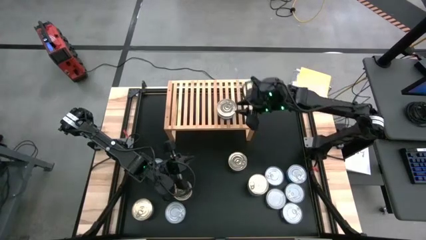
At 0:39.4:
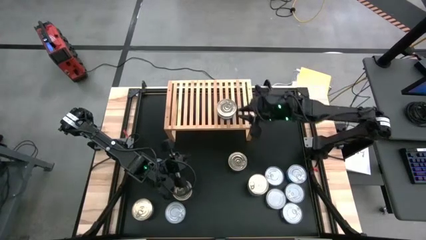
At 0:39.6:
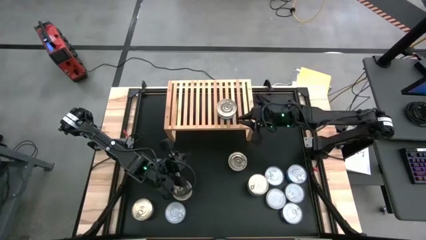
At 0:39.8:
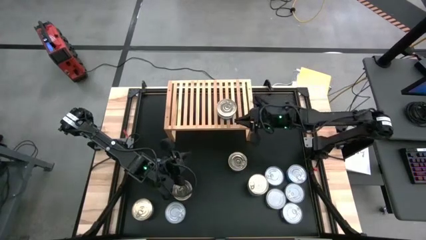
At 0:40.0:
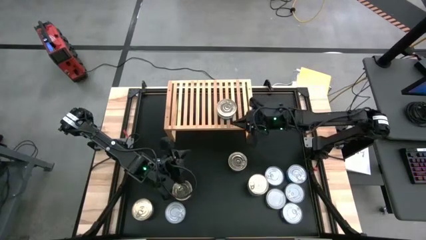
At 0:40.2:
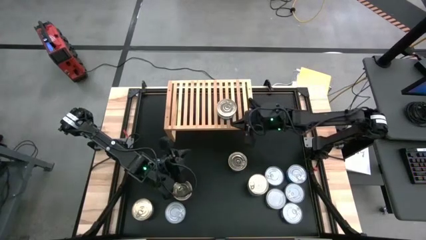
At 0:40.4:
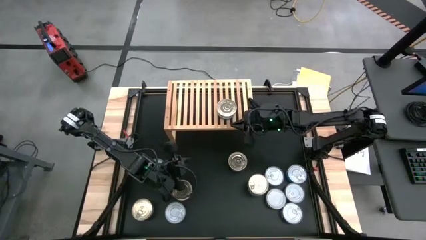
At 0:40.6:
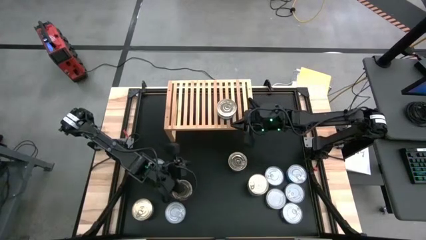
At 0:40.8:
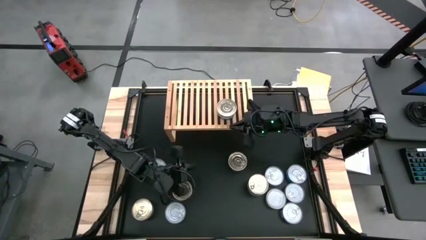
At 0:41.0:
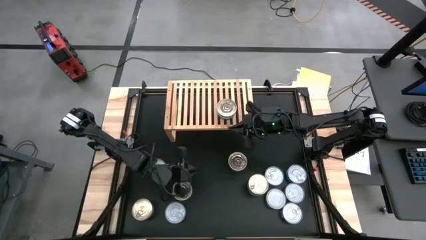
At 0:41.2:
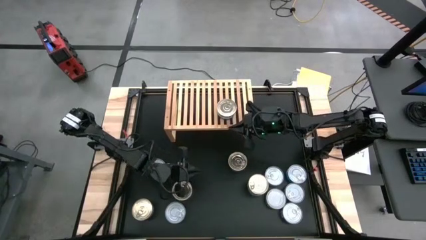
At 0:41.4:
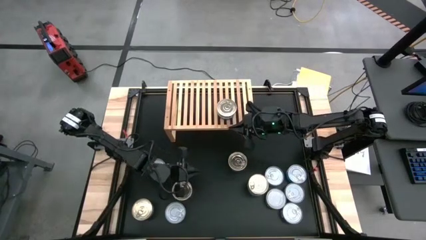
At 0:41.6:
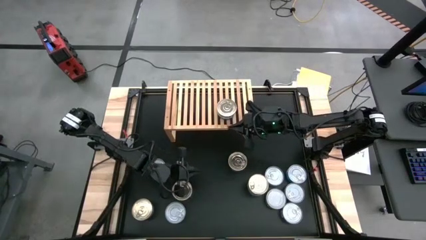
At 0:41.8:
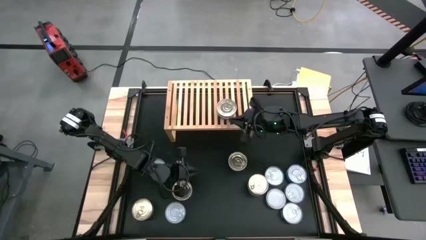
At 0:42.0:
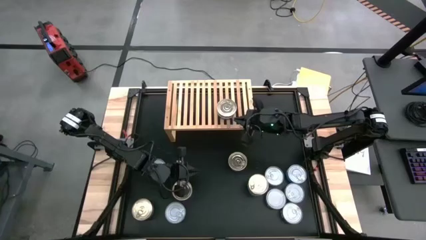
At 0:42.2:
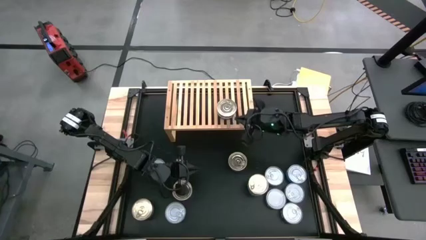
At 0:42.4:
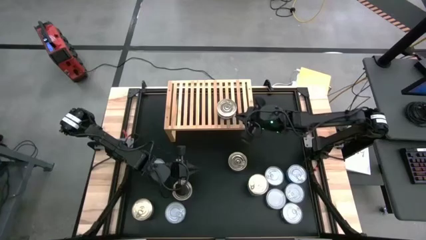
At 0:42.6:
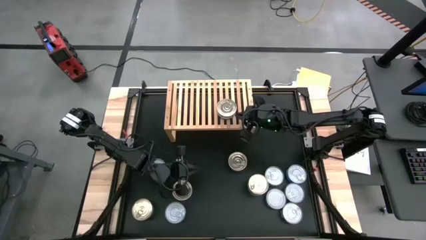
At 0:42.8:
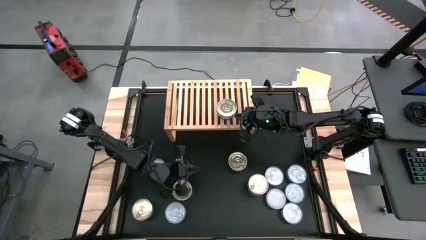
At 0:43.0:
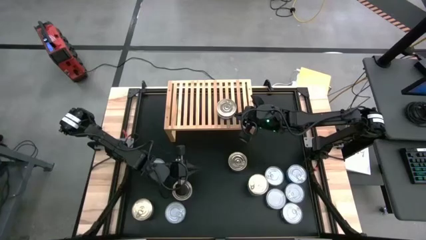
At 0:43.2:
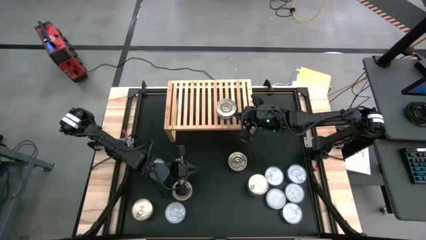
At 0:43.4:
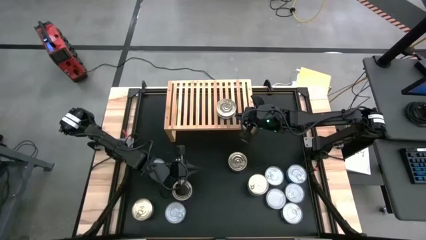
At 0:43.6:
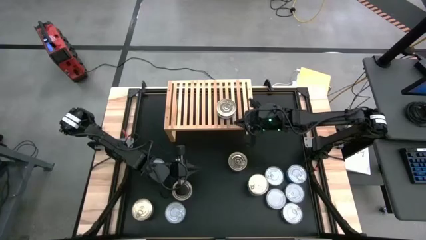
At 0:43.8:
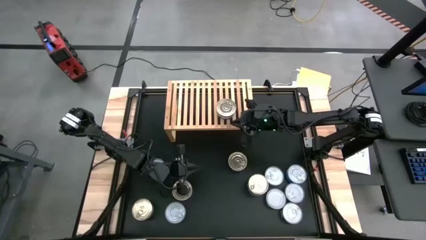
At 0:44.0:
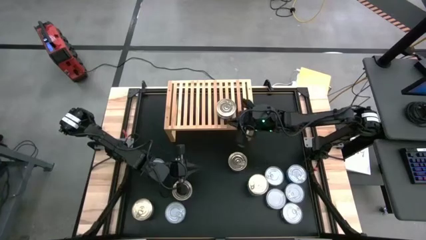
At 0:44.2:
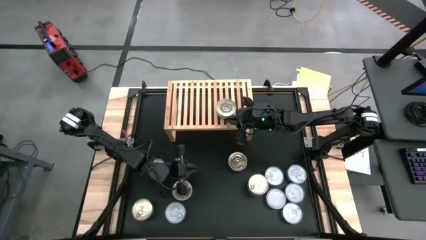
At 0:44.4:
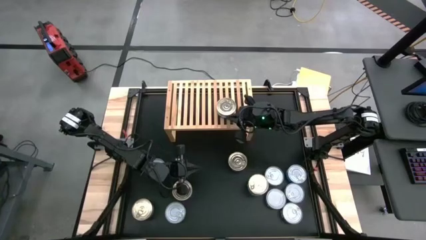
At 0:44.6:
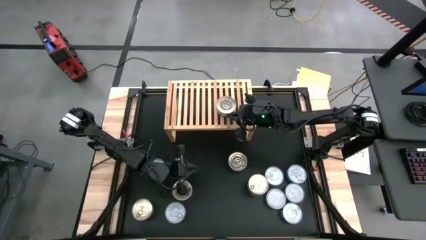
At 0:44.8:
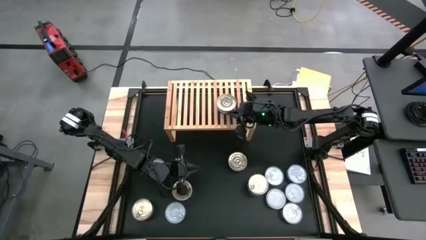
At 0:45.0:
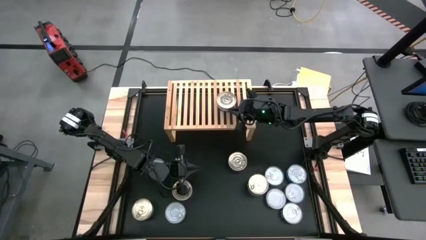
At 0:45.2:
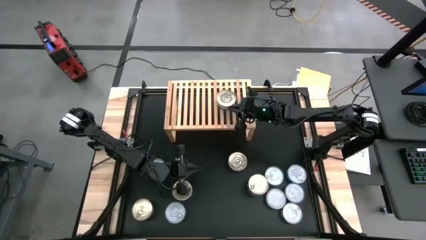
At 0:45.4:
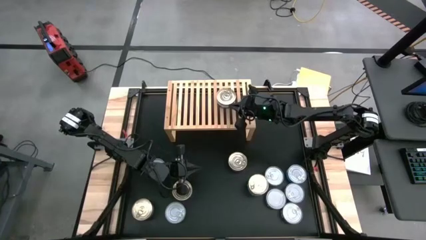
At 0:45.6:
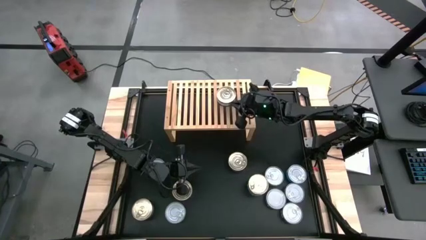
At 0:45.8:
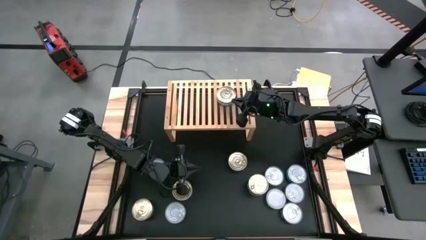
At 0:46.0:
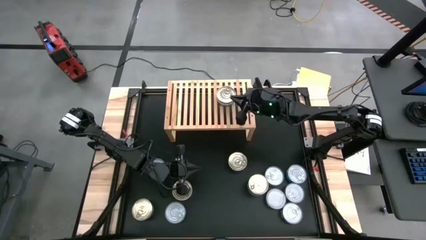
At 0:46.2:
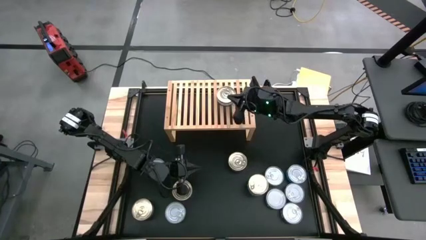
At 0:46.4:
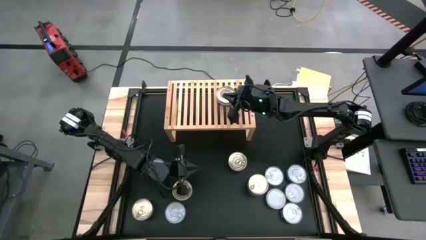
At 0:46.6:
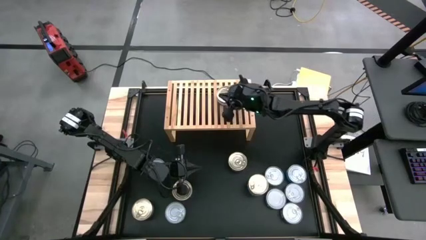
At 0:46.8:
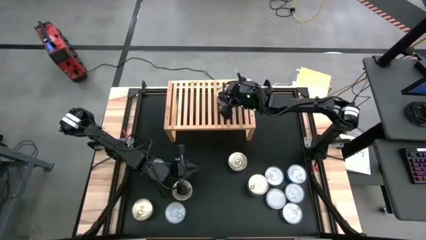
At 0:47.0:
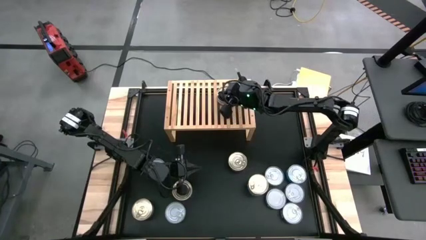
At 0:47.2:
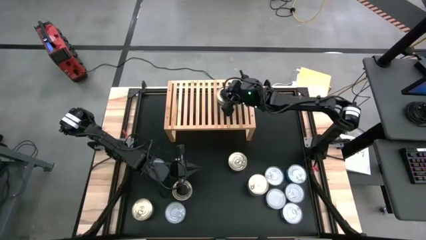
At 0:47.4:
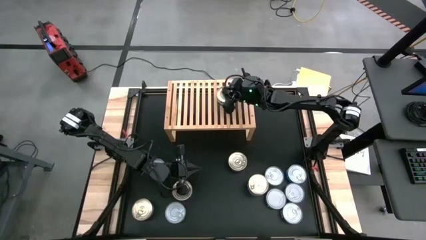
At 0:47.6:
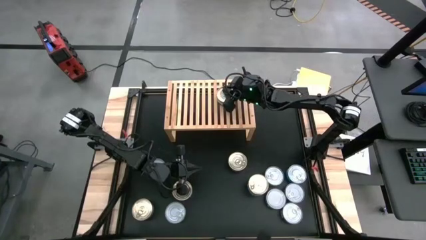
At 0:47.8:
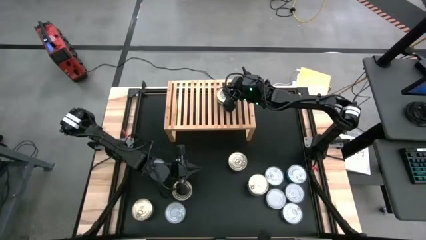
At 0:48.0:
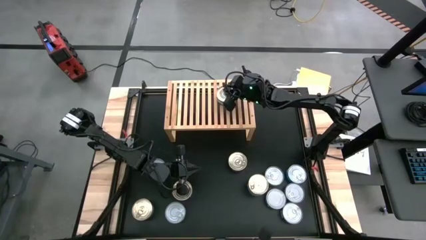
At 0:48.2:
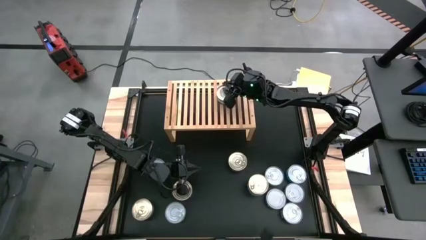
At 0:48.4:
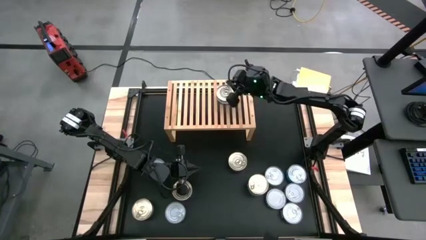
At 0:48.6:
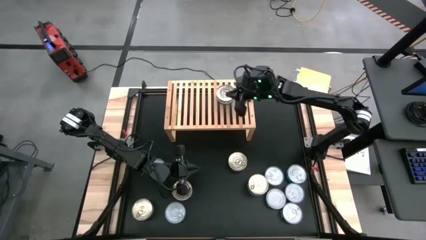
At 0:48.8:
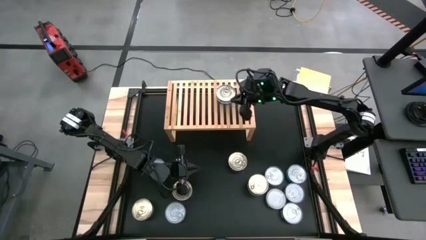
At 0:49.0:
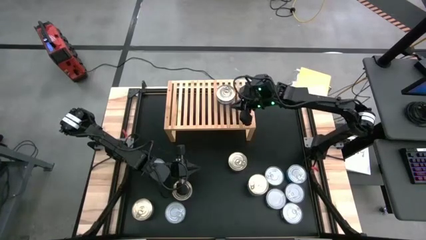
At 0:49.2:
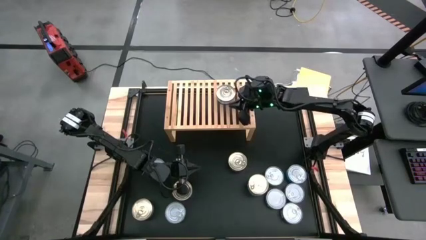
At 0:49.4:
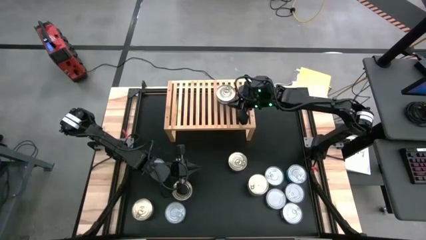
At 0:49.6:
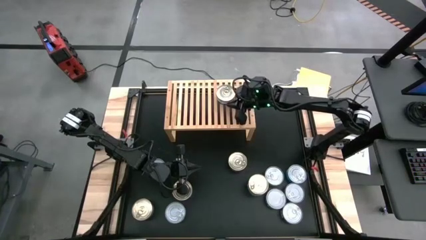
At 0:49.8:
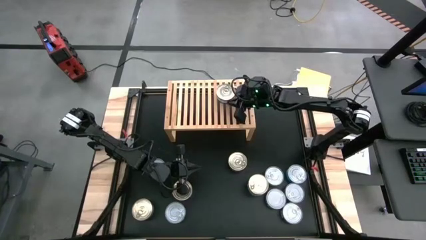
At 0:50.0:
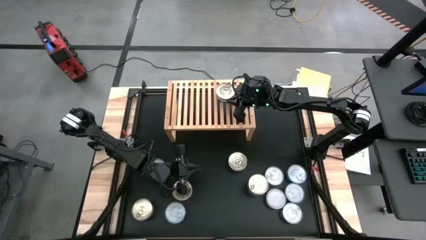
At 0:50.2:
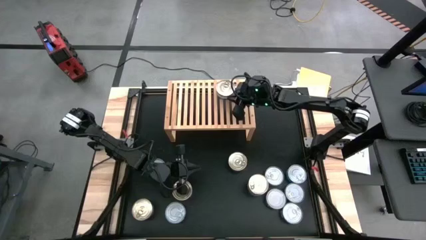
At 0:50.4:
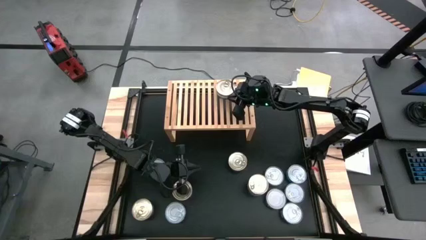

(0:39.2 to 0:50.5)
Task: Stack canned seafood by type on shelf
Put the blue and pink tuna can on the shelf

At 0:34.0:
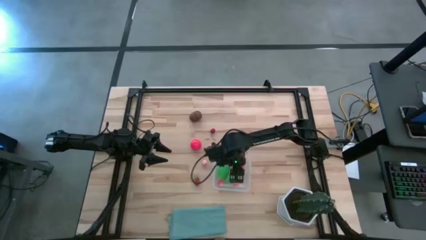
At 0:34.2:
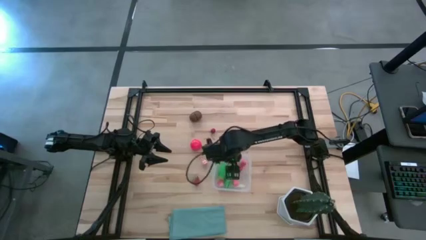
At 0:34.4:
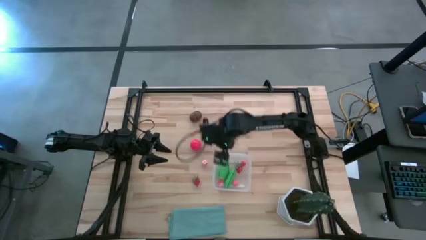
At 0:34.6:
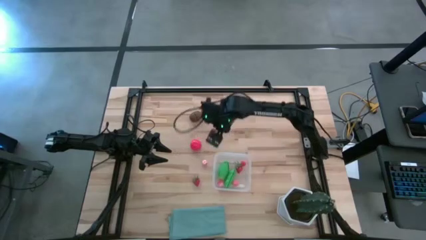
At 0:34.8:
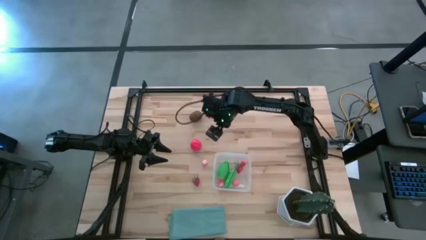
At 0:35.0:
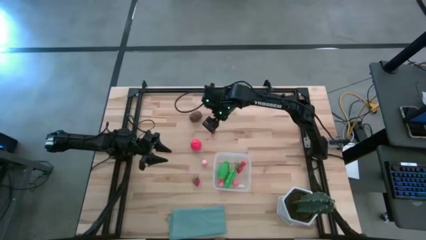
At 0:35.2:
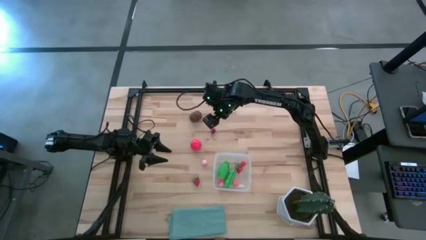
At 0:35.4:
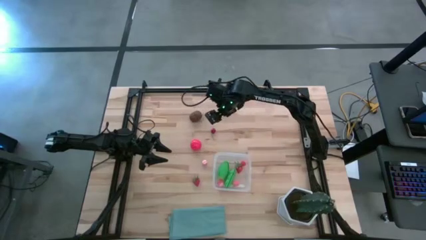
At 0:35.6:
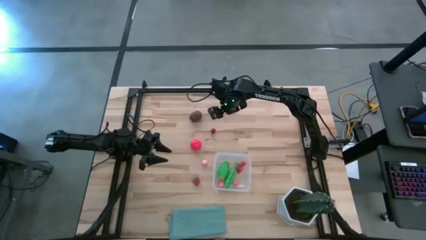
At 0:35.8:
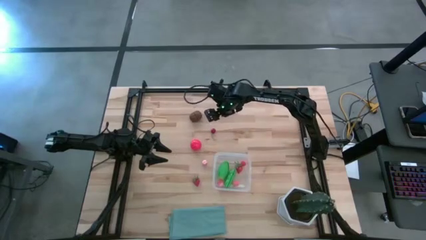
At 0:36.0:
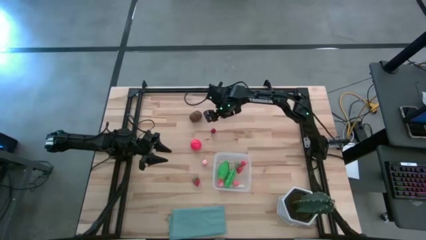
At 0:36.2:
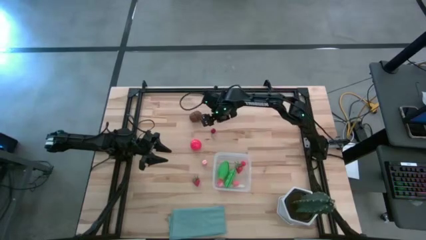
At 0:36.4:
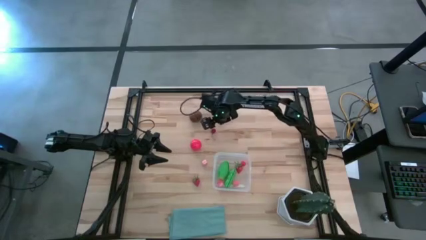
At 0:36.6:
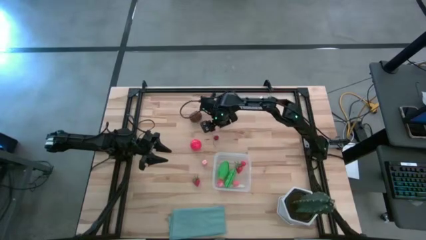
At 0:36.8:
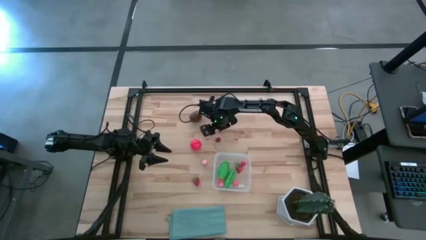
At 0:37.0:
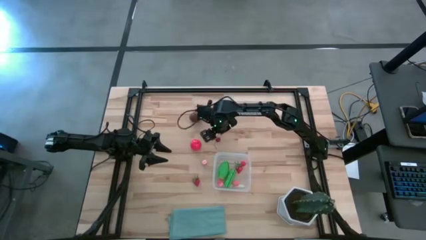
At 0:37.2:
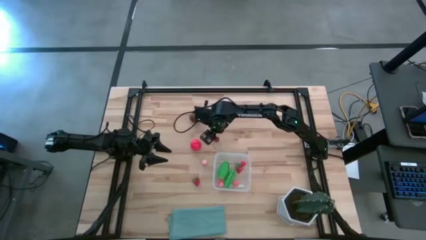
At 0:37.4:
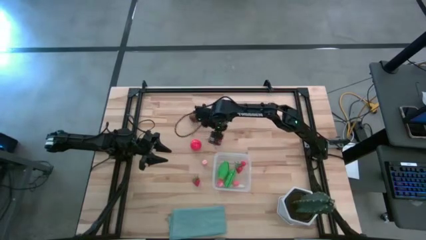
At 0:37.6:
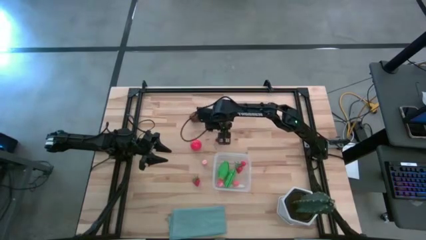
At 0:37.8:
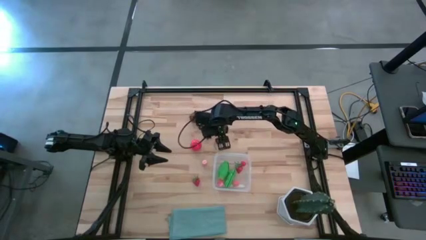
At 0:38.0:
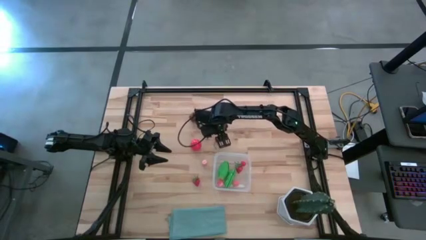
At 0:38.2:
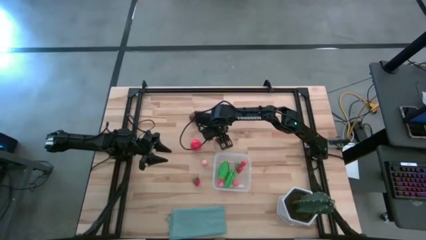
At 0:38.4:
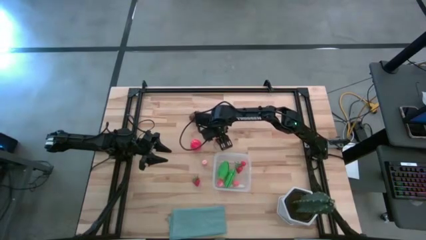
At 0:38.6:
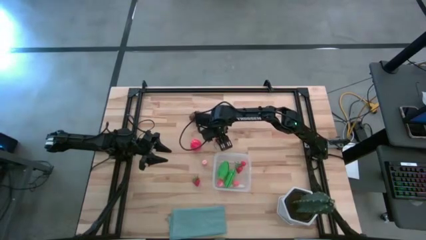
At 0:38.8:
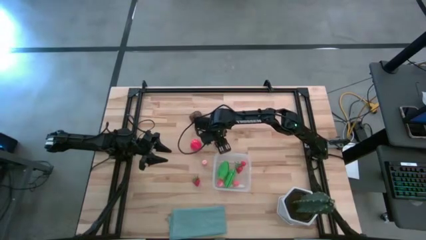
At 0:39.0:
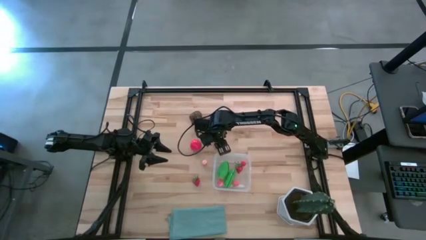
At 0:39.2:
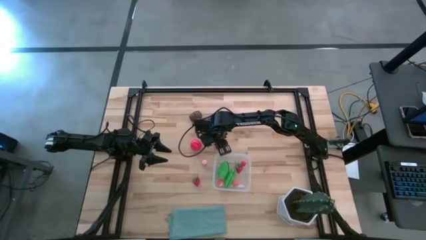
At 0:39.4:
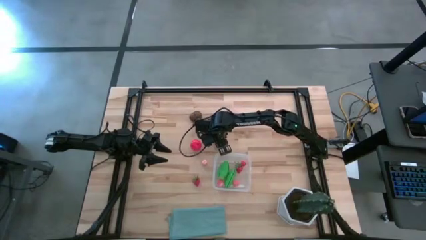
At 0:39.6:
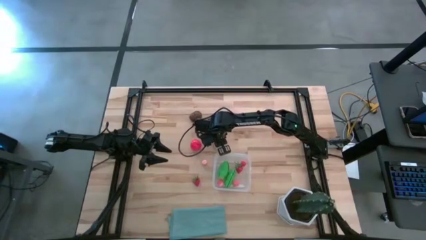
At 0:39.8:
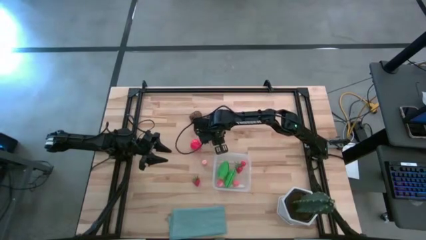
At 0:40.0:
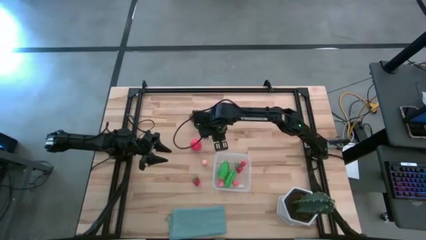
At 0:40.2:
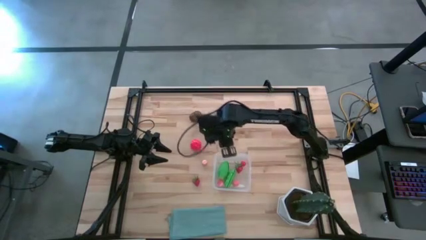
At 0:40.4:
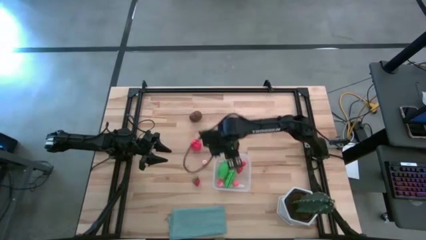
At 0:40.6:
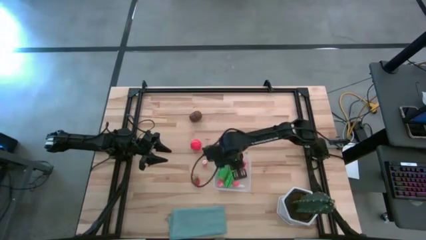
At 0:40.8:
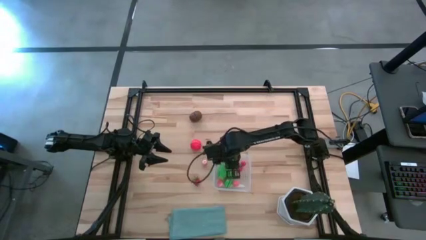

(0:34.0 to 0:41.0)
Task: Pick and placing Produce into tupperware
Put the cherry into the transparent container
